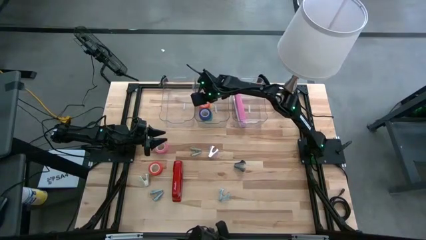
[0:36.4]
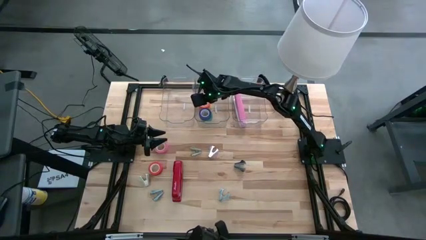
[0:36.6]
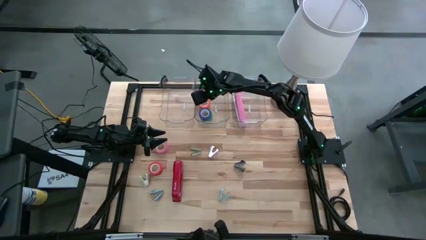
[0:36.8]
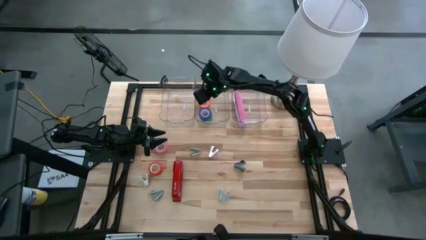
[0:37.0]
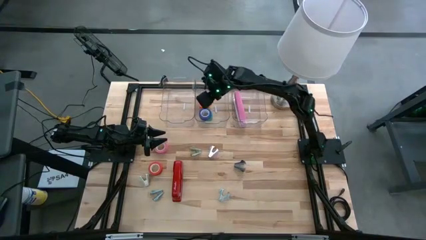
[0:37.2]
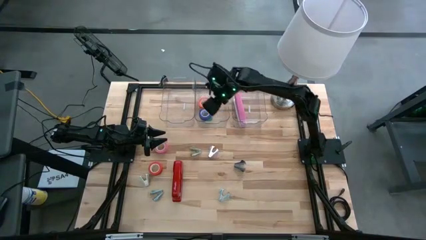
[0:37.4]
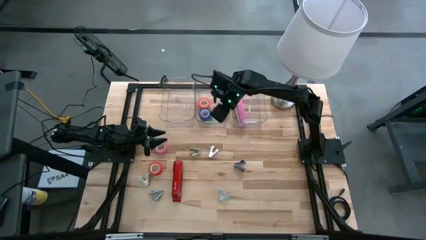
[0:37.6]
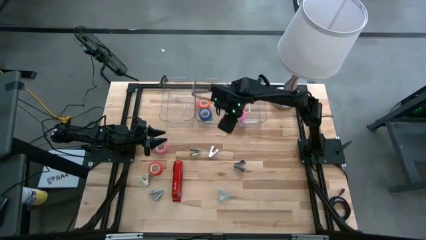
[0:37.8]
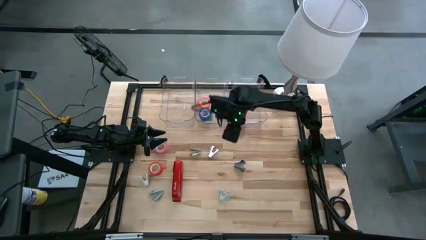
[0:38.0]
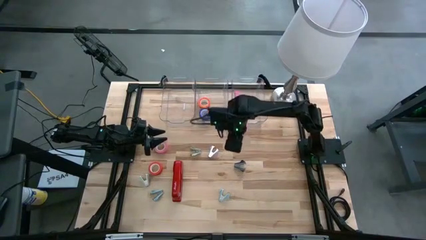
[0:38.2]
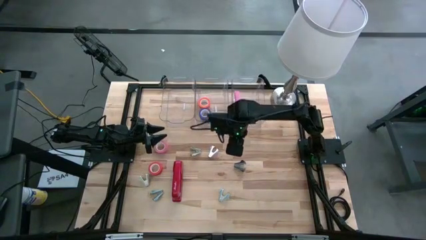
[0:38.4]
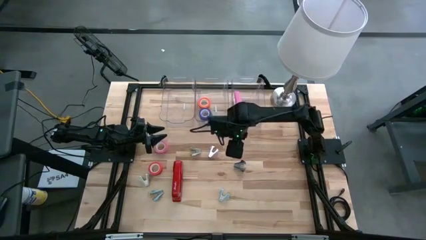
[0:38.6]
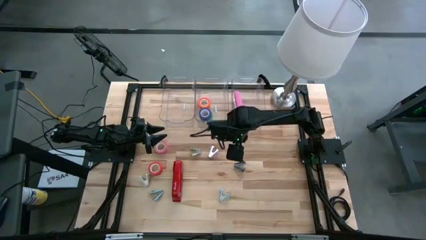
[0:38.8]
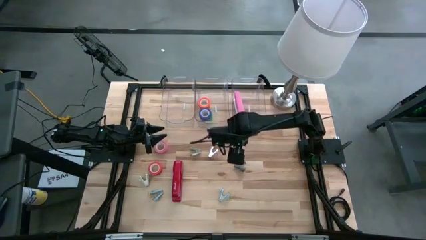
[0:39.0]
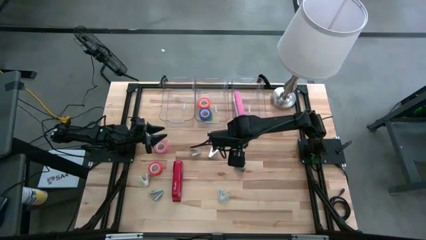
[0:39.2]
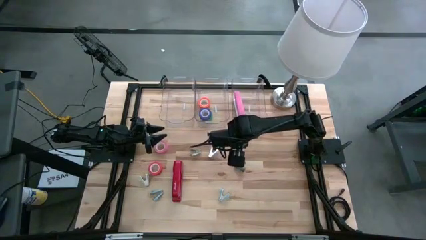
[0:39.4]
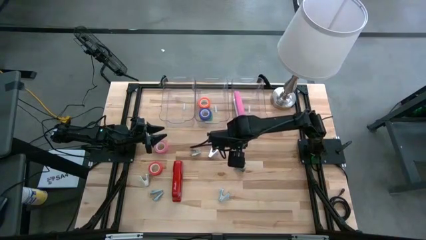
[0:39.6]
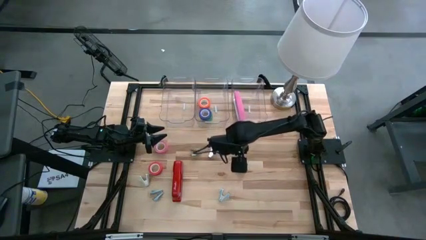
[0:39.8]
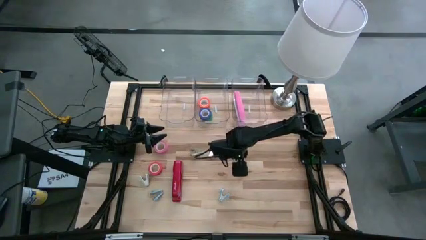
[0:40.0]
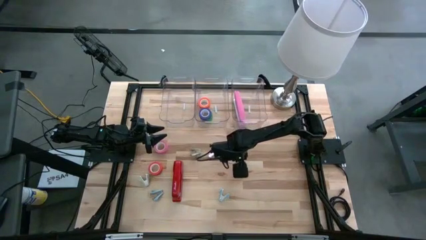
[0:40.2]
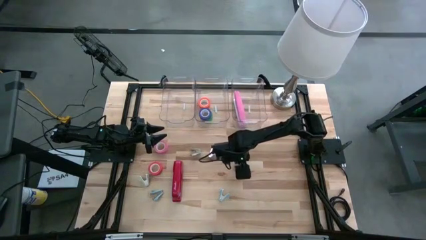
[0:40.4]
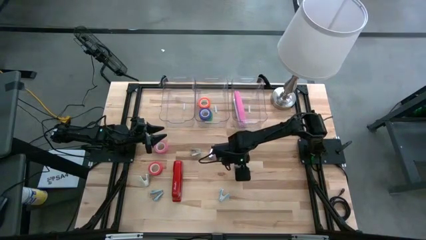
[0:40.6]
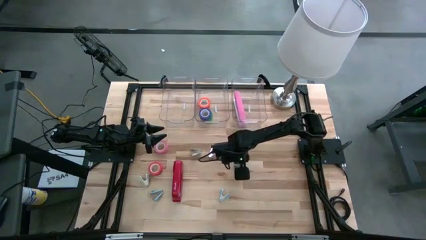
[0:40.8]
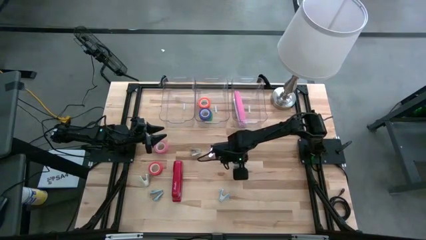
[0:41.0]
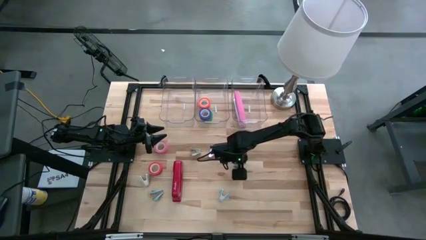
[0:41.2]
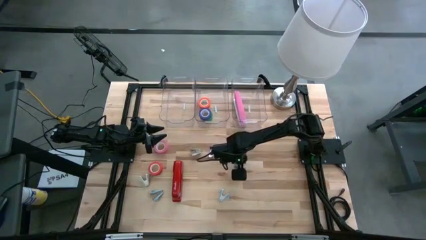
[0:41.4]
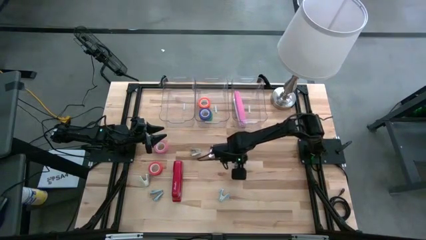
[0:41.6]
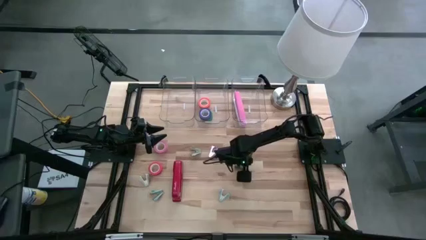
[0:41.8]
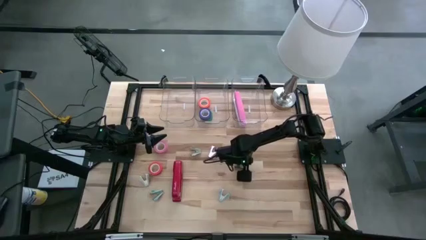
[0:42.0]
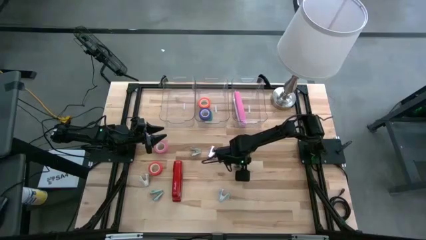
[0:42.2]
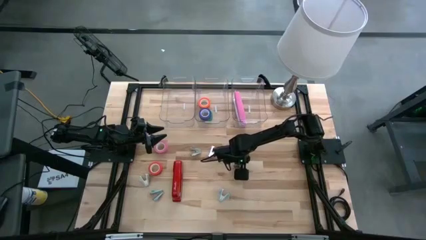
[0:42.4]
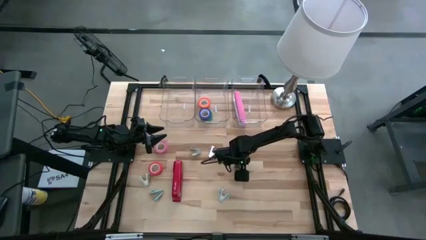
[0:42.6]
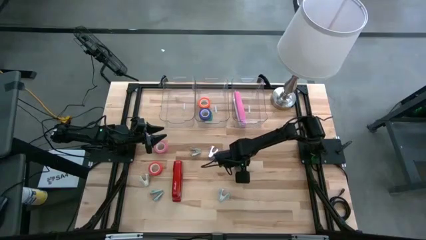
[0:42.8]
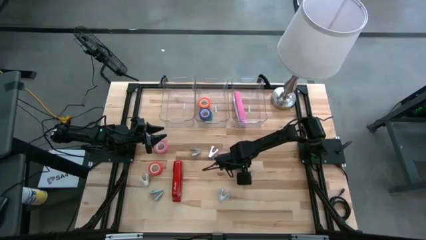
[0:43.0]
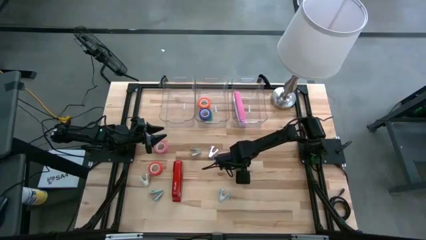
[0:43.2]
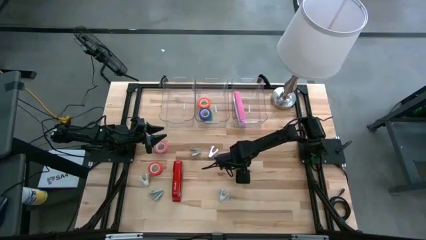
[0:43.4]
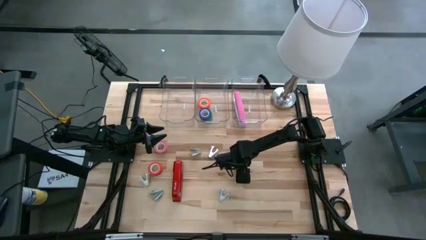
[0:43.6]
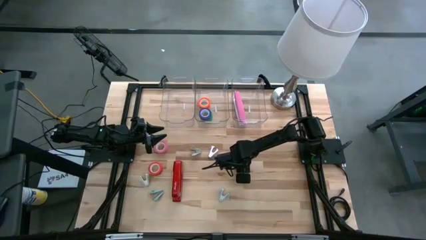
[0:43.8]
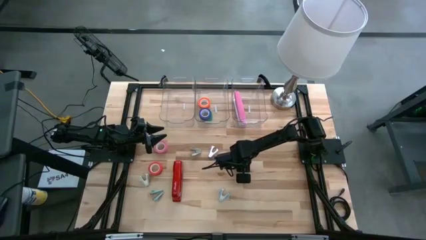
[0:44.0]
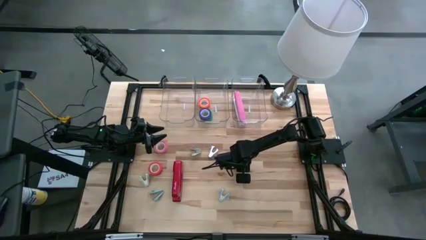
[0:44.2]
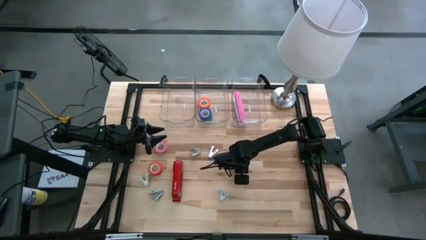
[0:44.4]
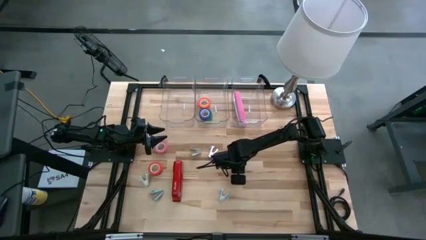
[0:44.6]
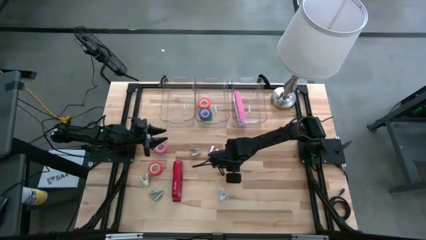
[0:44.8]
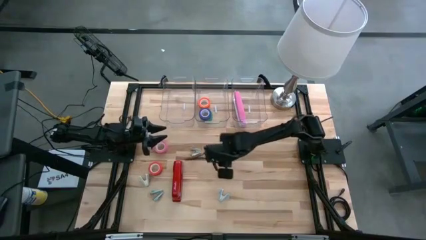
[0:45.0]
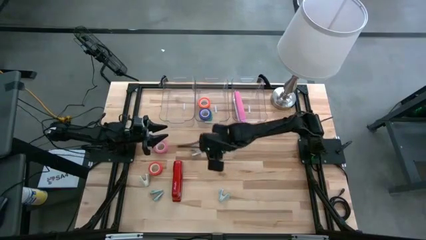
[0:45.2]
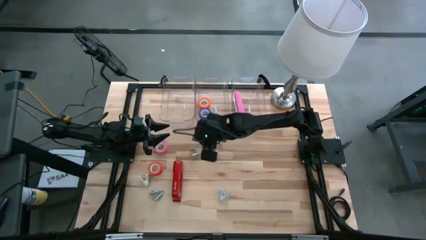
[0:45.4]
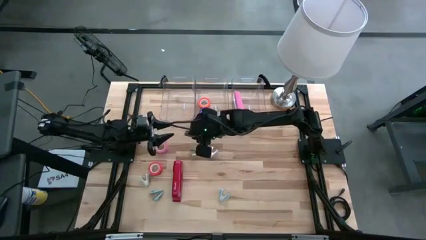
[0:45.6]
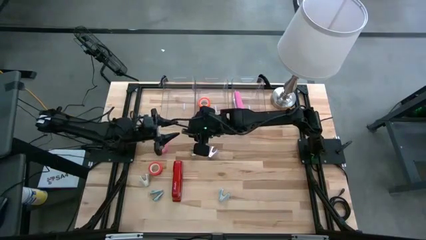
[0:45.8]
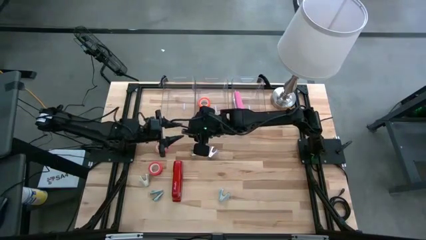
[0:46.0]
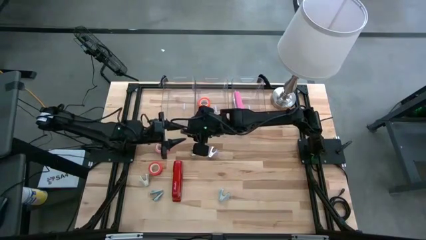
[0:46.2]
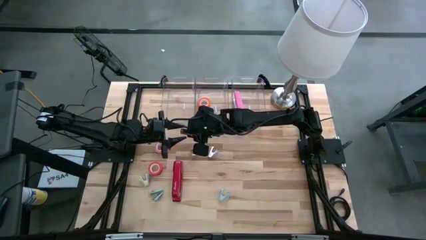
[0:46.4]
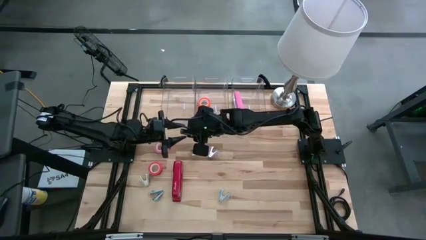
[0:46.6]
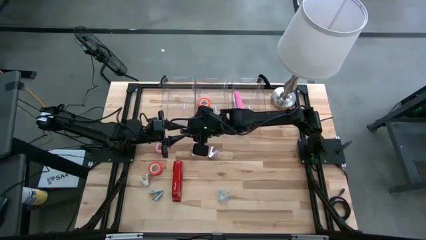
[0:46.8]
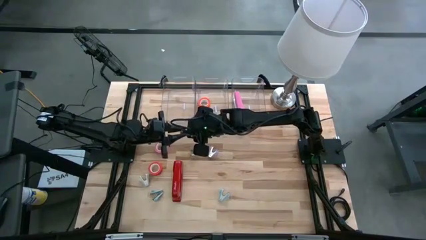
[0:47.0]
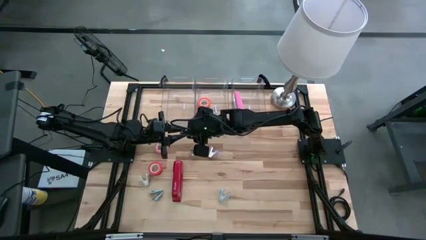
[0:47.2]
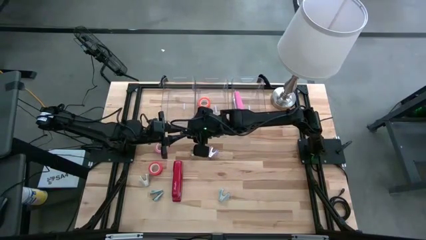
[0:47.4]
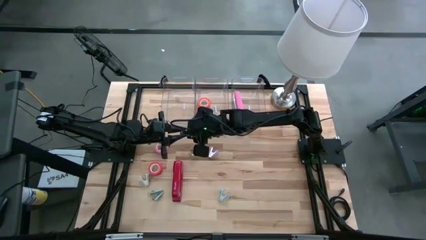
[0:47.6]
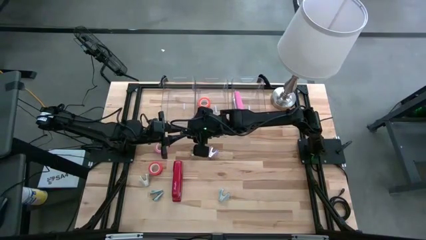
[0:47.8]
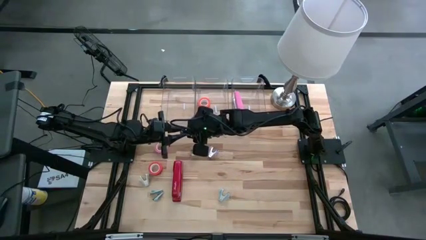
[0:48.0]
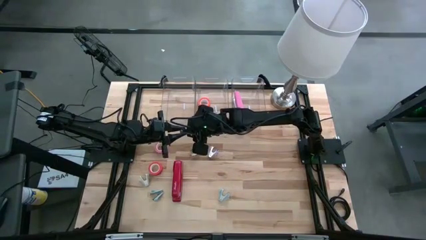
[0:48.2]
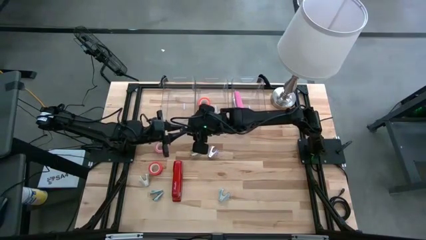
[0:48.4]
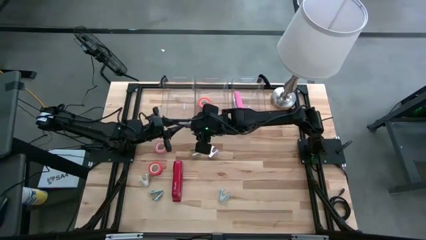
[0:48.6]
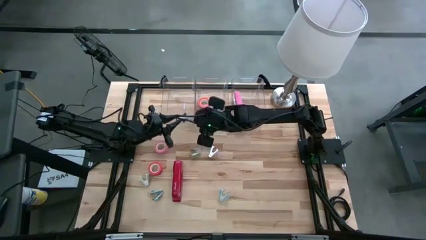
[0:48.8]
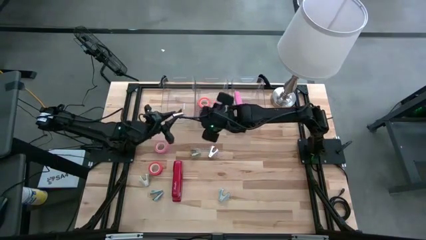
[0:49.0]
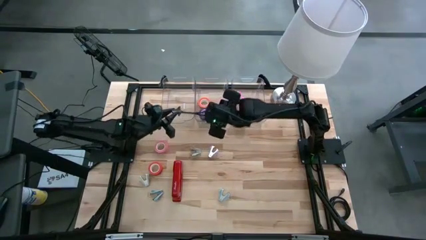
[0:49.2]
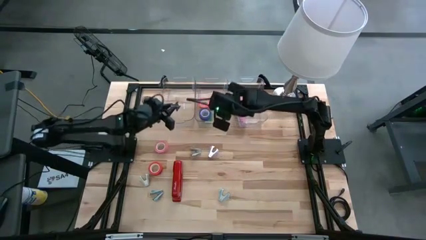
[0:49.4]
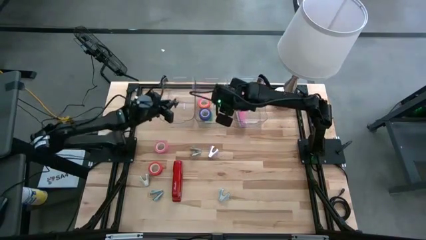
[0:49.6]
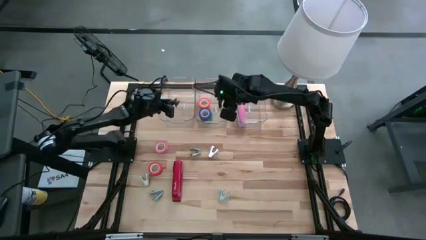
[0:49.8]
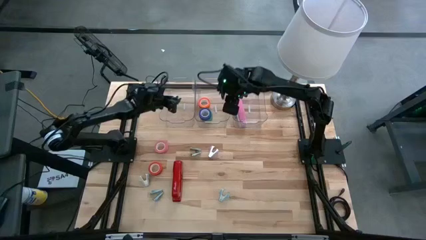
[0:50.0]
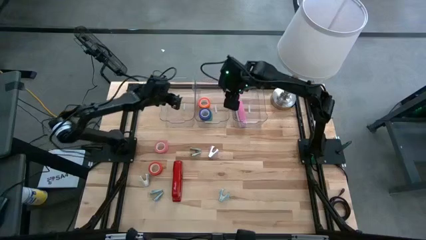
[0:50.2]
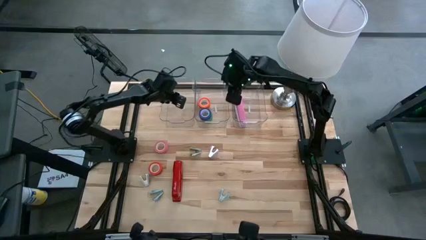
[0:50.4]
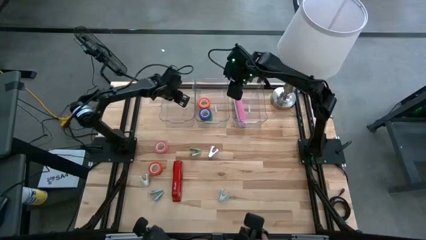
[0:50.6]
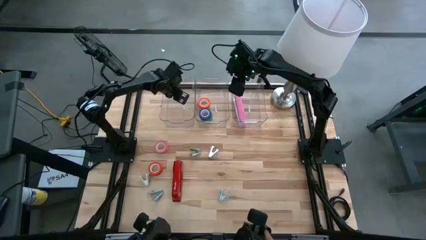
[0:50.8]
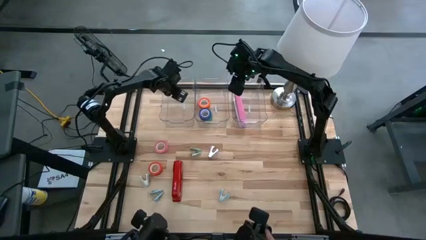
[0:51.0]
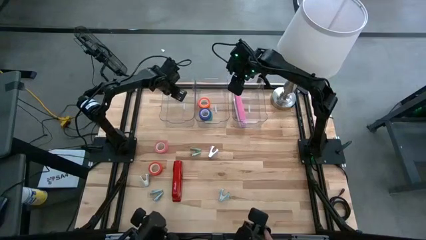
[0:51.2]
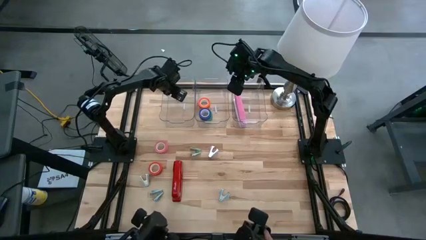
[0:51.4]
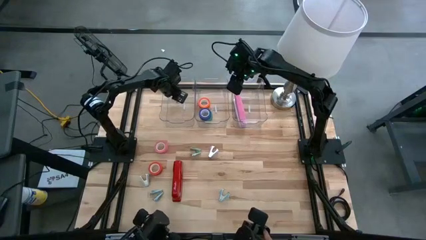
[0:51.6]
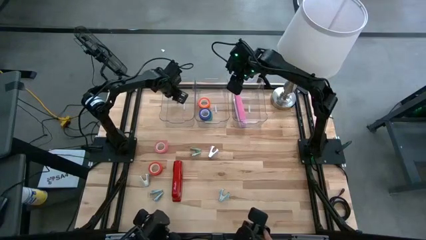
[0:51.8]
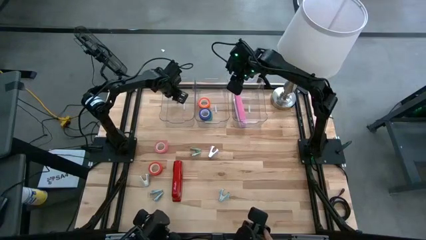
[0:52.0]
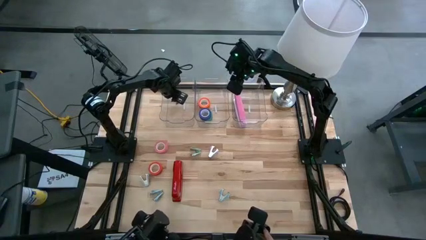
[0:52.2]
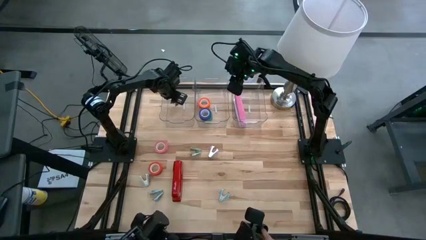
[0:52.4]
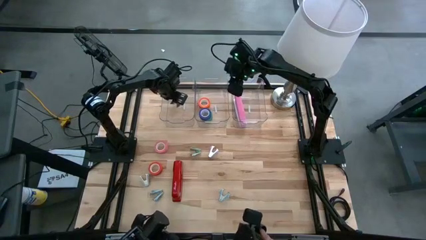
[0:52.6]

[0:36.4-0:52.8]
Task: Pick and place Stapler, Stapler remover, tape
Put the dark gray staple remover into the left transparent bin
